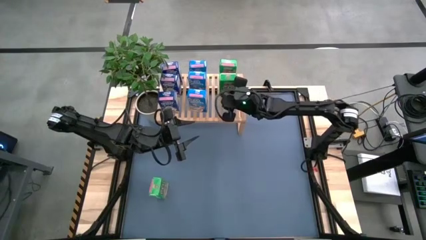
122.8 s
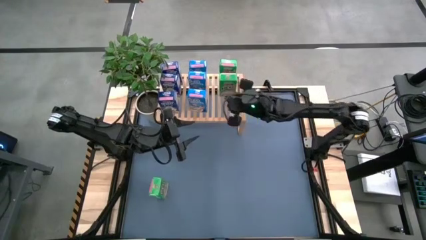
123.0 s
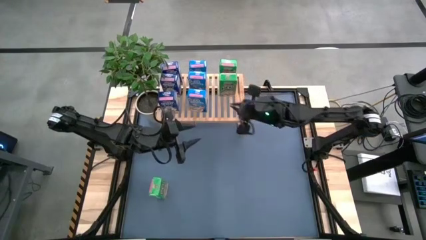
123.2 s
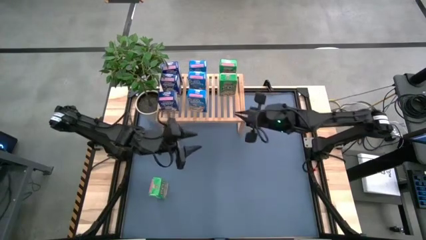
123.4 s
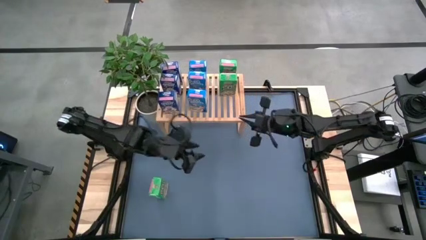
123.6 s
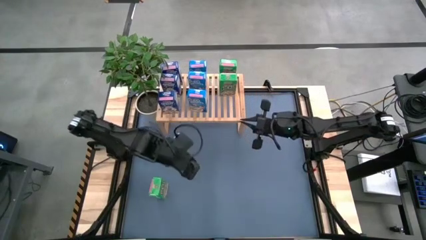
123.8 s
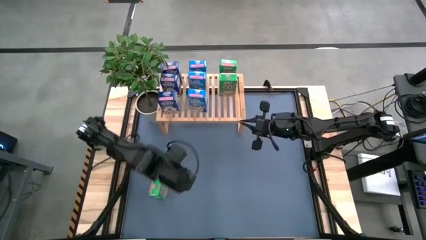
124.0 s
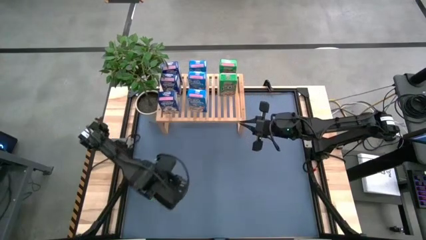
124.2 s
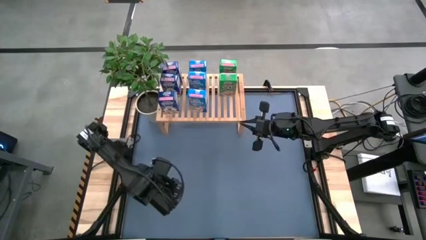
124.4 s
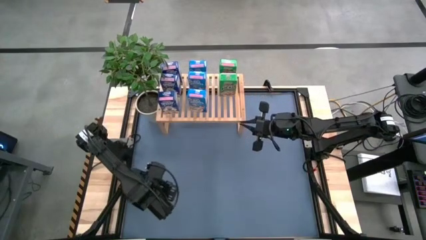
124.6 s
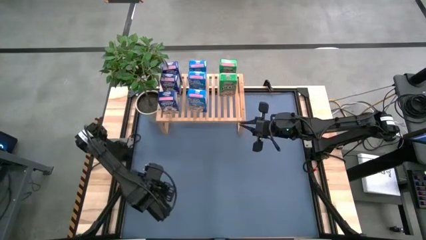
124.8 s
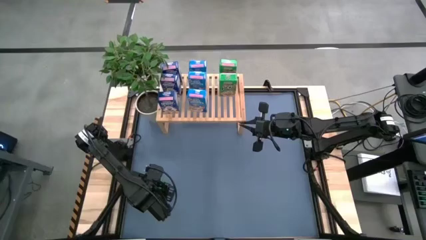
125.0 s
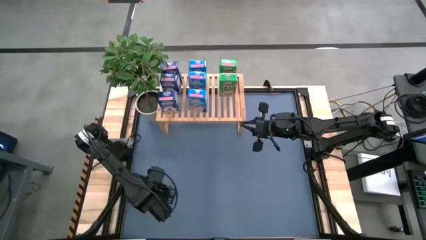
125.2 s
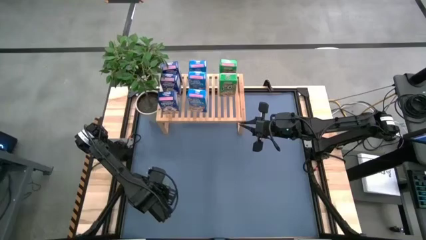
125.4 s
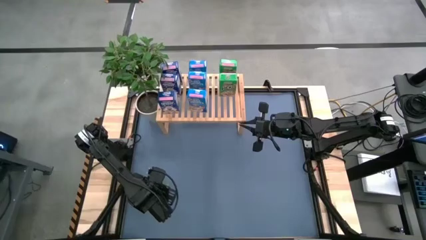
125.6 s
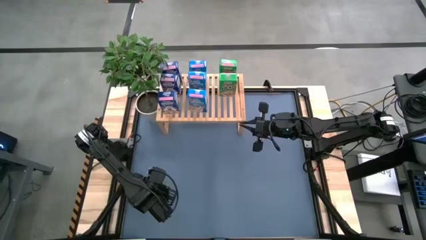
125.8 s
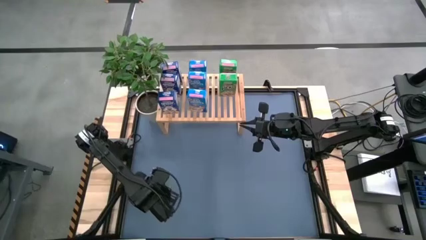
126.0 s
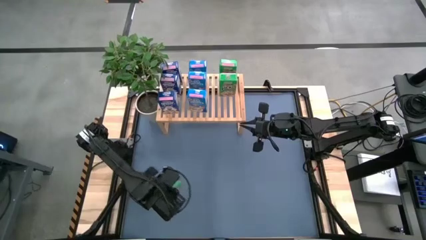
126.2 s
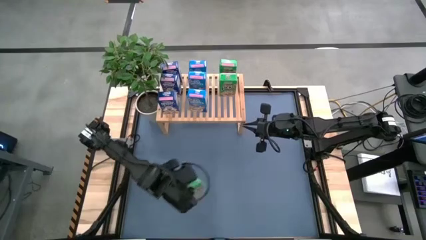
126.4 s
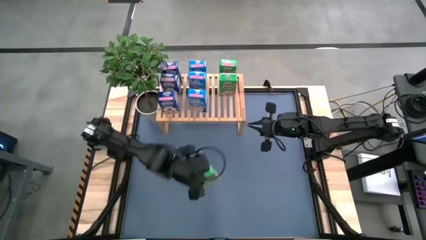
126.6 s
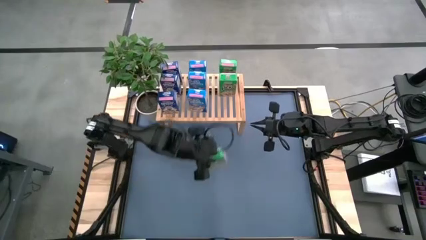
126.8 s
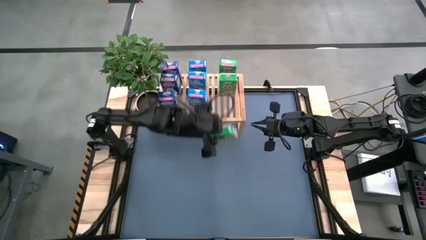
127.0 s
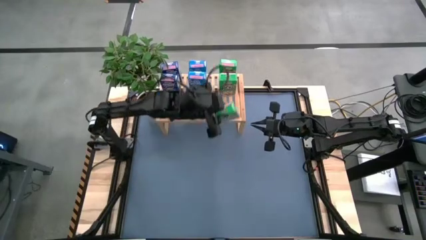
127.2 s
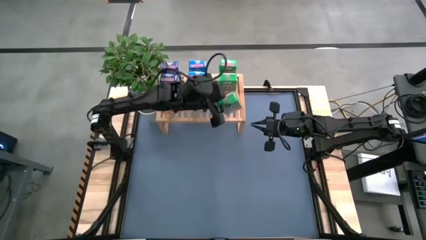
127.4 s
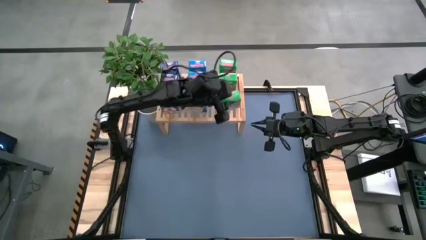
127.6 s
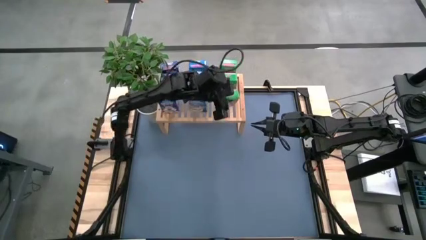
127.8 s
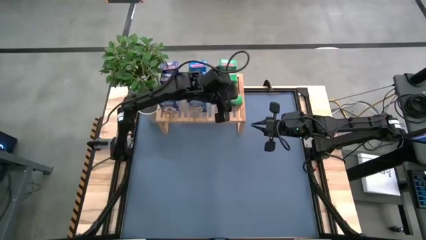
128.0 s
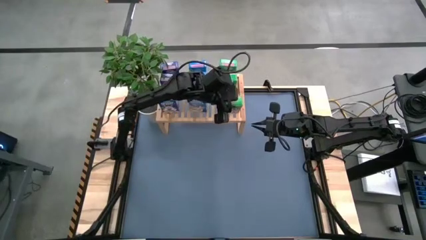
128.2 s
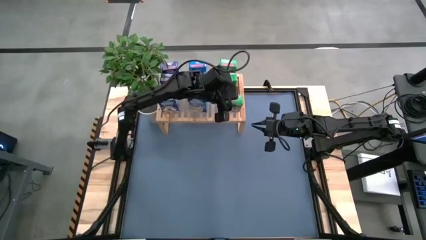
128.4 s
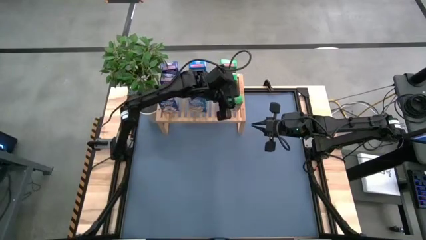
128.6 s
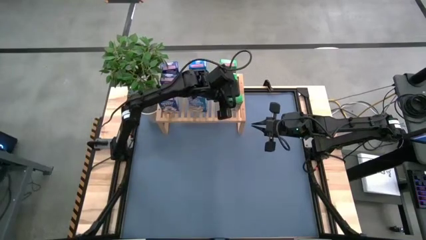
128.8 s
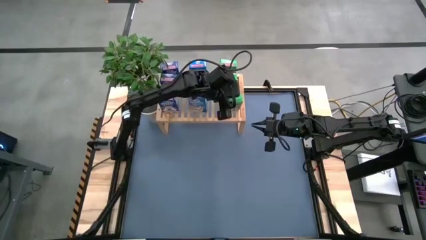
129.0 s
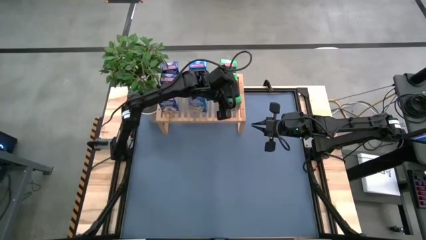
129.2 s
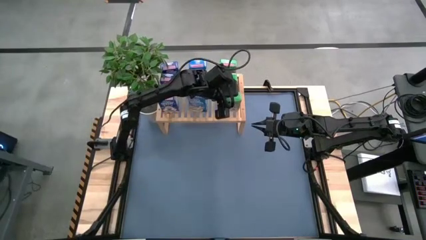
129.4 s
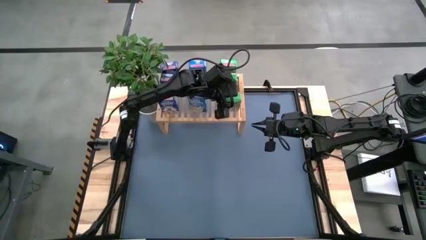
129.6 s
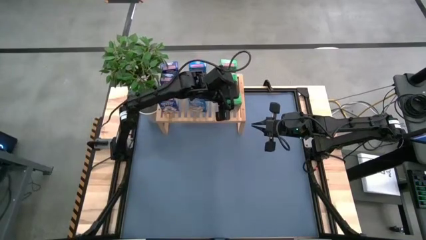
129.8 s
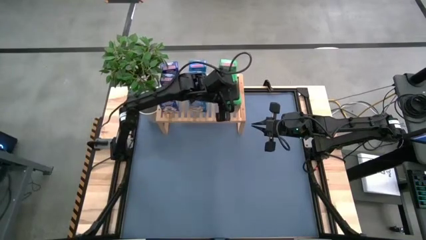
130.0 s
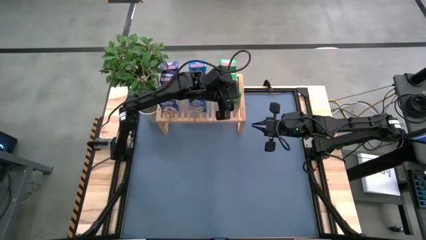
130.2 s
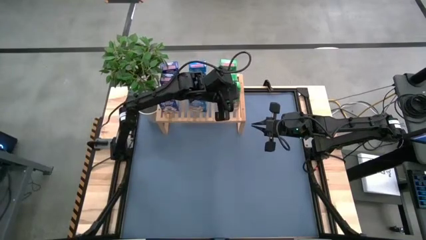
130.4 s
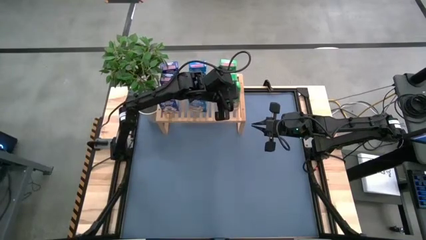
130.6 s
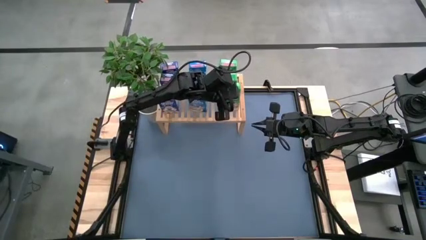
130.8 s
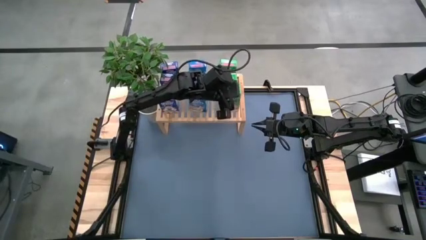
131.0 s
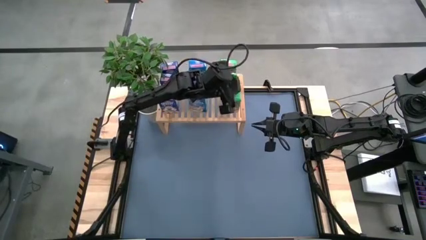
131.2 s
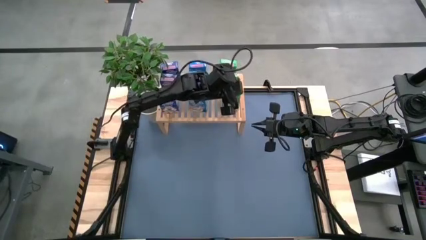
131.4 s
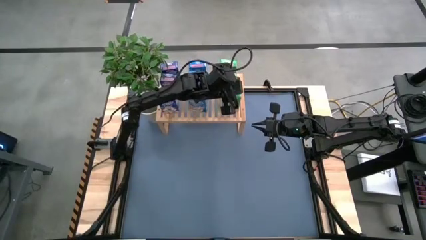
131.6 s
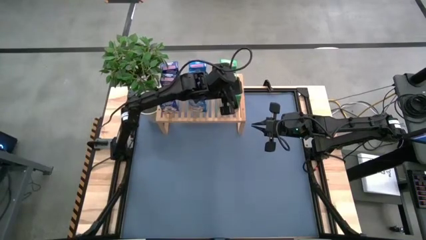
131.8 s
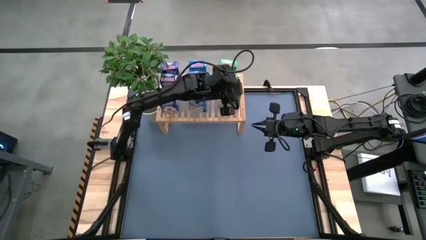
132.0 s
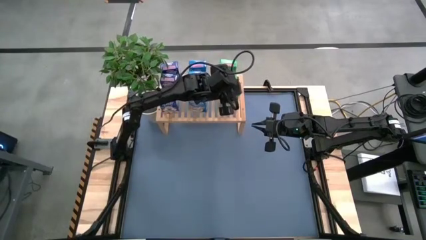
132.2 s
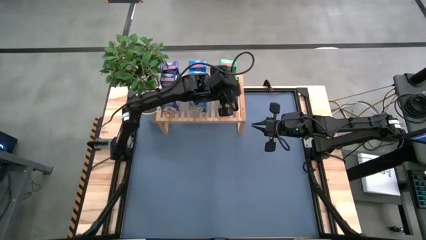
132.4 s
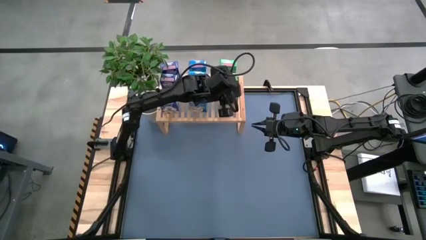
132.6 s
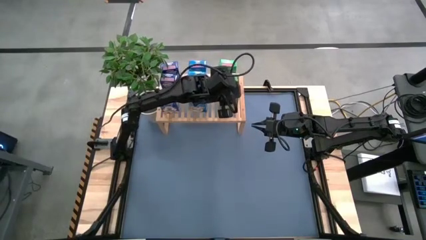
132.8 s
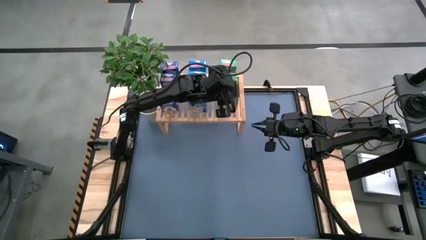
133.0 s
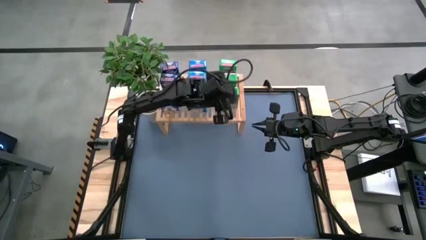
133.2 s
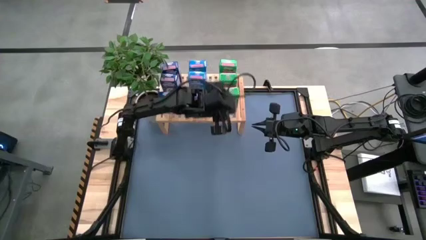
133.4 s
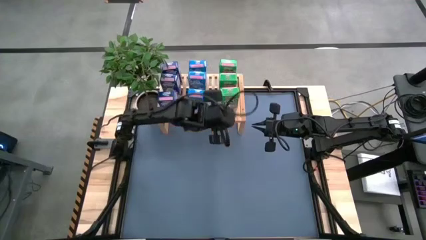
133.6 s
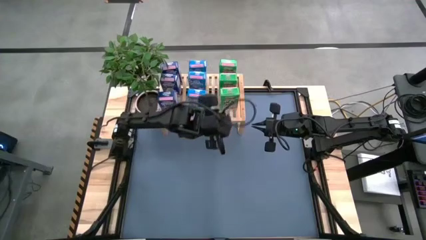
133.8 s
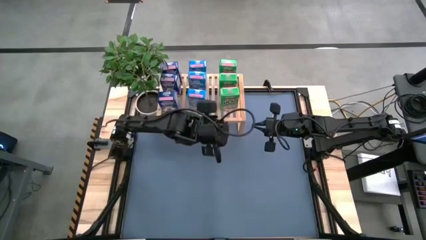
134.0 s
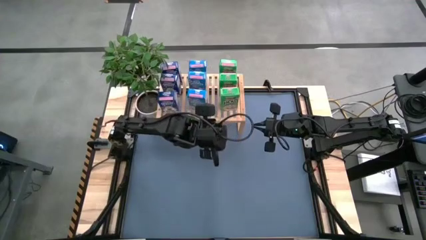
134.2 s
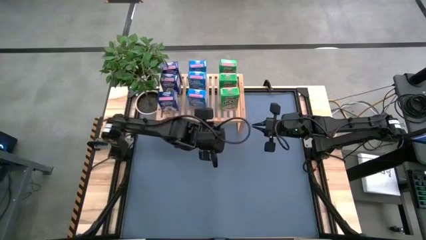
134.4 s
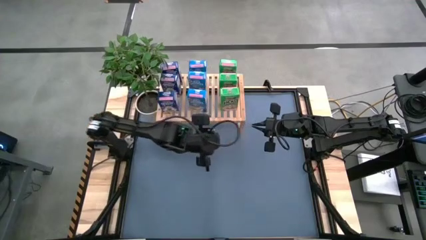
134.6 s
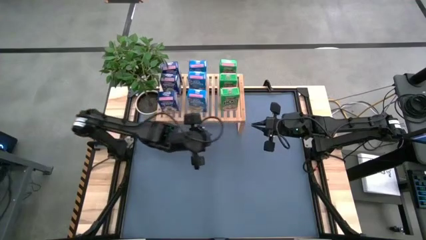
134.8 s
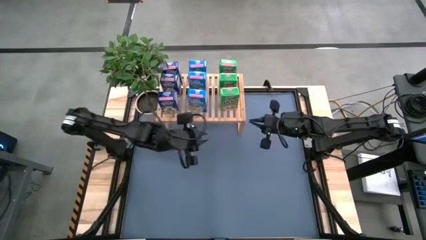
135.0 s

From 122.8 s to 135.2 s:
Task: Stack cereal on shelf
Put the green cereal box on the shelf aligned with the green cereal boxes
